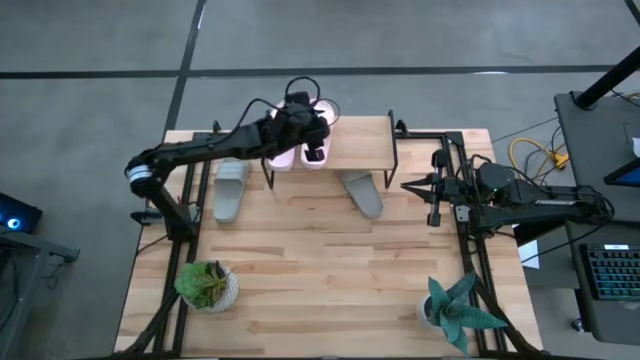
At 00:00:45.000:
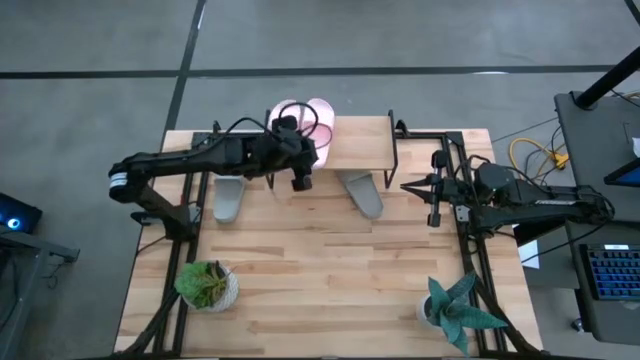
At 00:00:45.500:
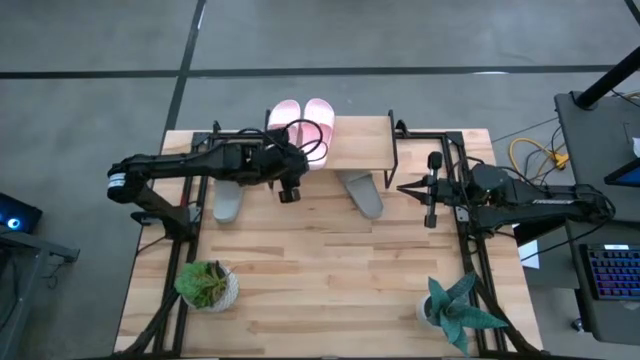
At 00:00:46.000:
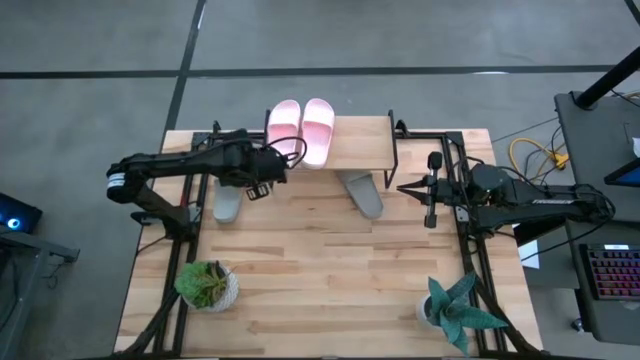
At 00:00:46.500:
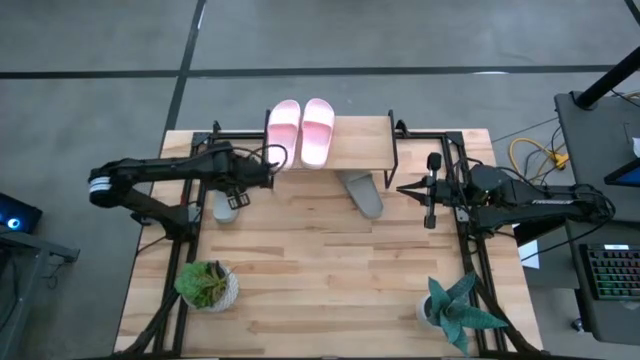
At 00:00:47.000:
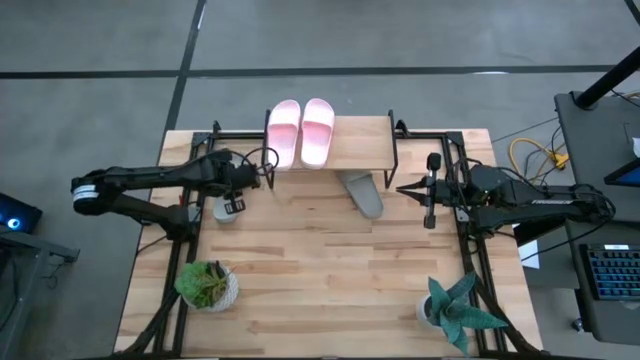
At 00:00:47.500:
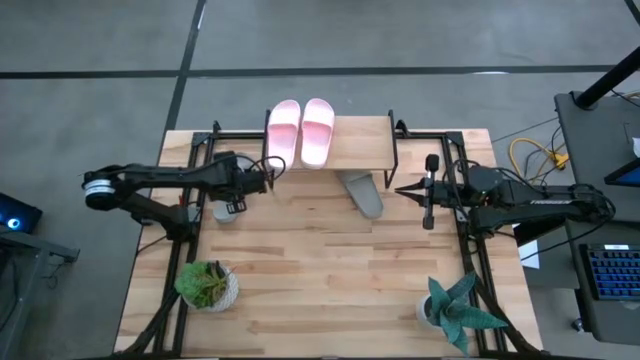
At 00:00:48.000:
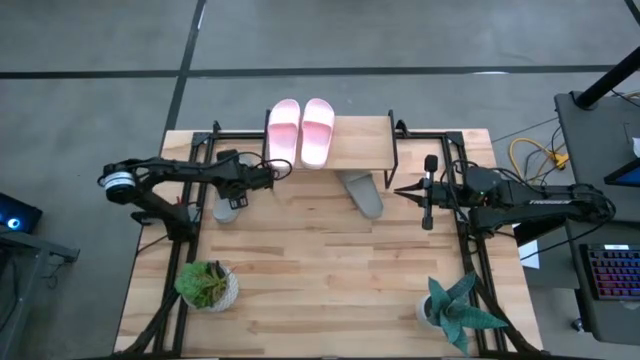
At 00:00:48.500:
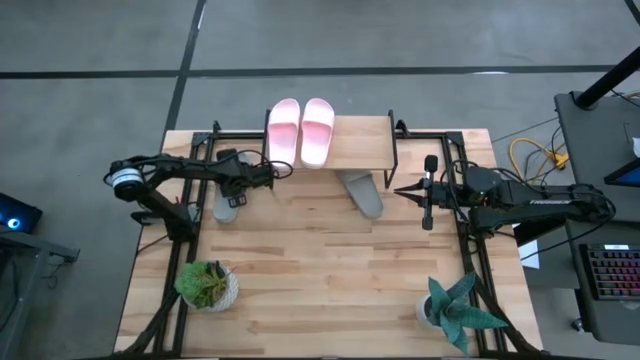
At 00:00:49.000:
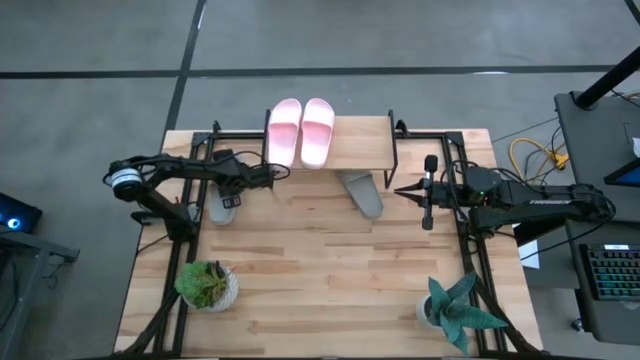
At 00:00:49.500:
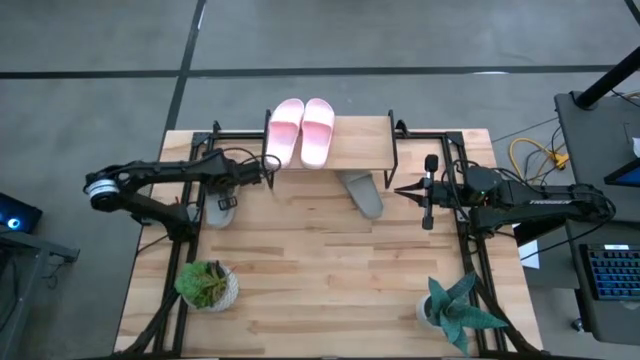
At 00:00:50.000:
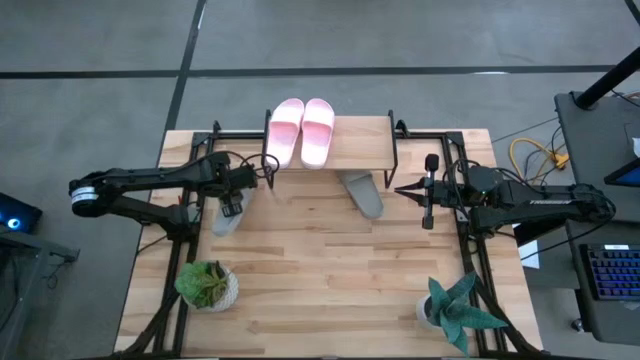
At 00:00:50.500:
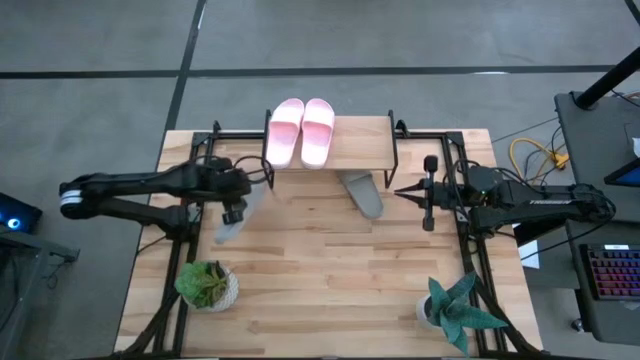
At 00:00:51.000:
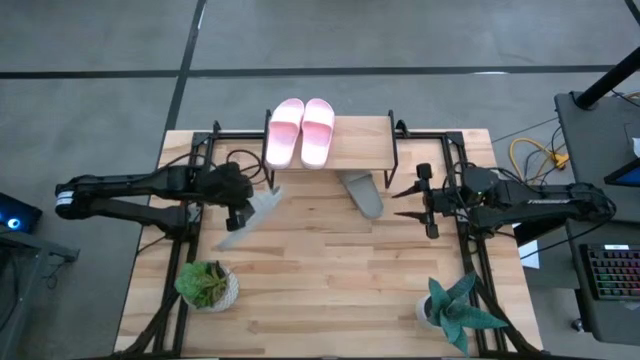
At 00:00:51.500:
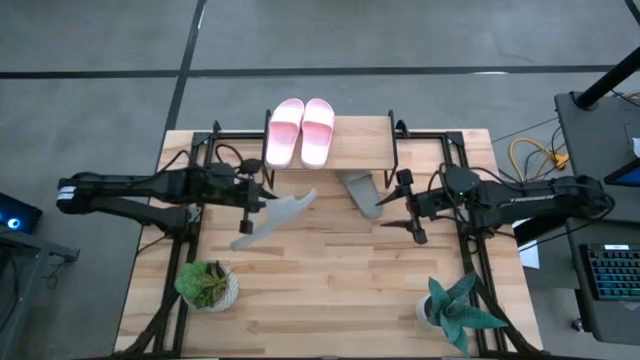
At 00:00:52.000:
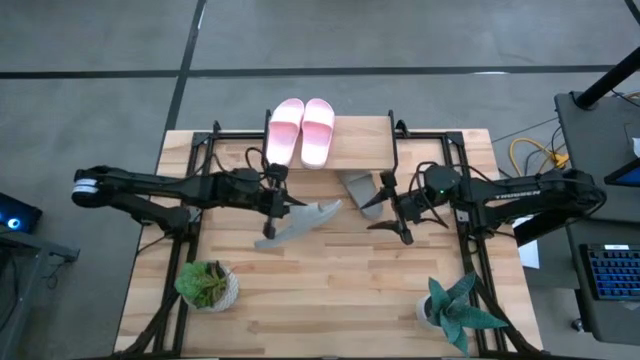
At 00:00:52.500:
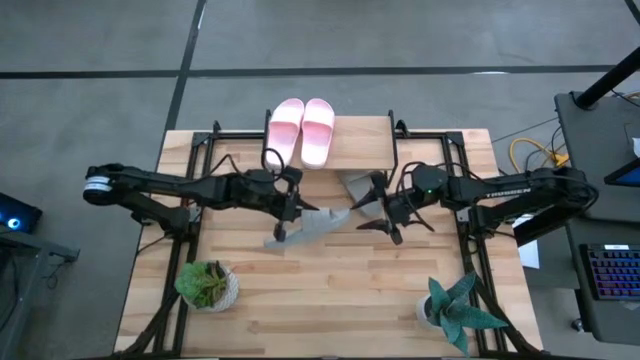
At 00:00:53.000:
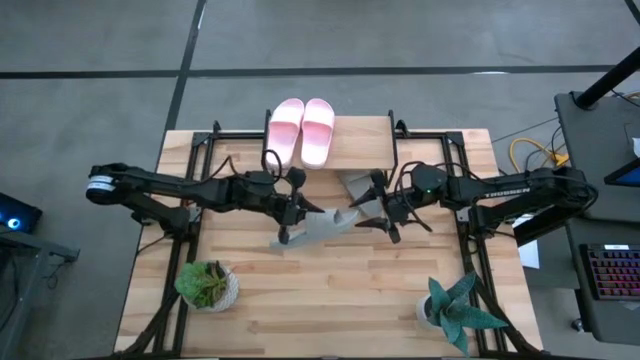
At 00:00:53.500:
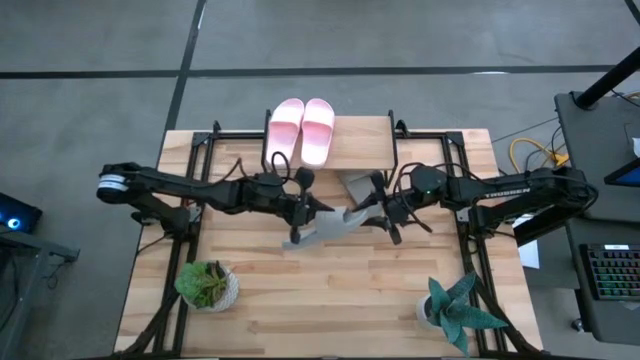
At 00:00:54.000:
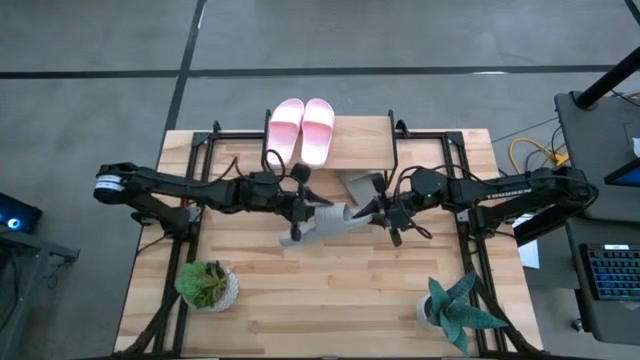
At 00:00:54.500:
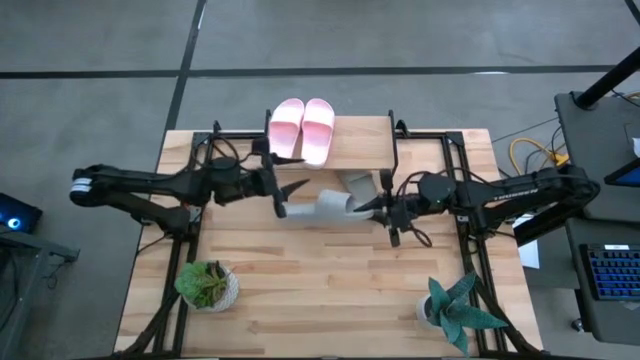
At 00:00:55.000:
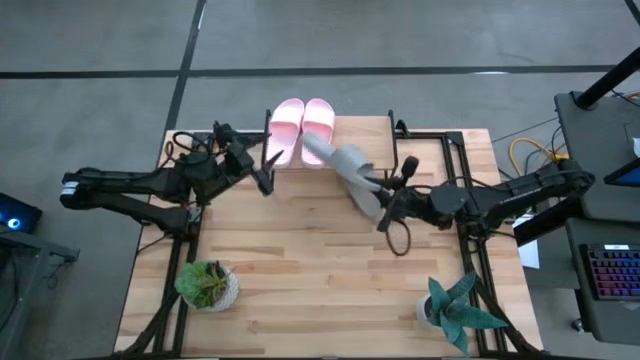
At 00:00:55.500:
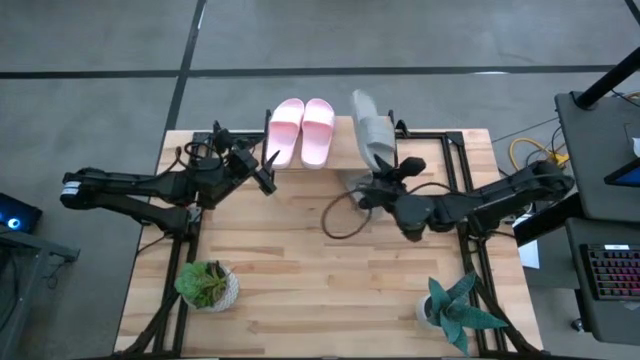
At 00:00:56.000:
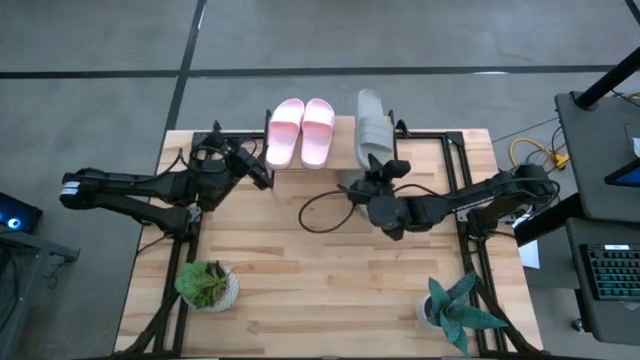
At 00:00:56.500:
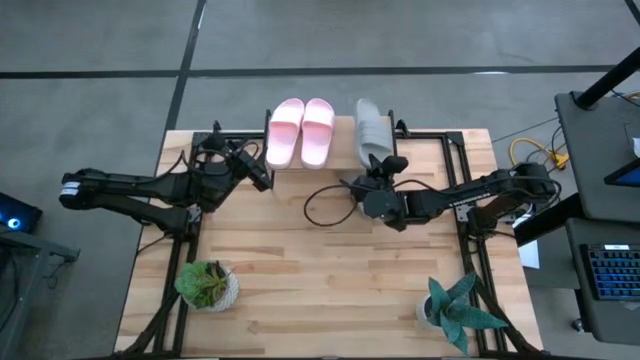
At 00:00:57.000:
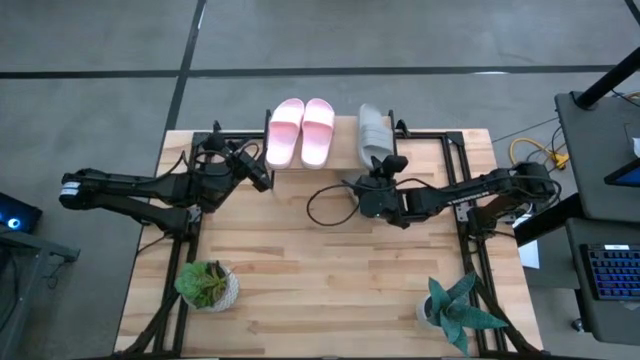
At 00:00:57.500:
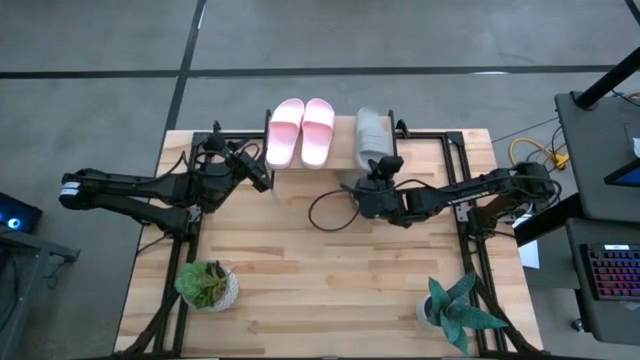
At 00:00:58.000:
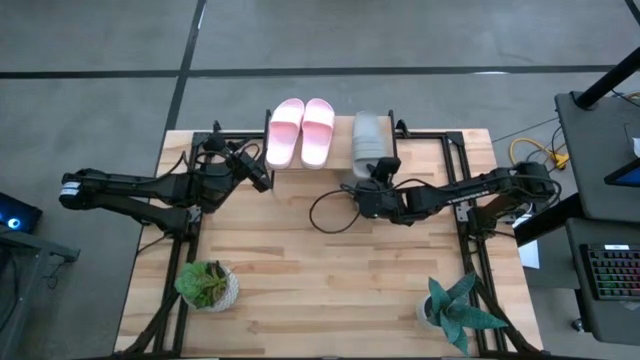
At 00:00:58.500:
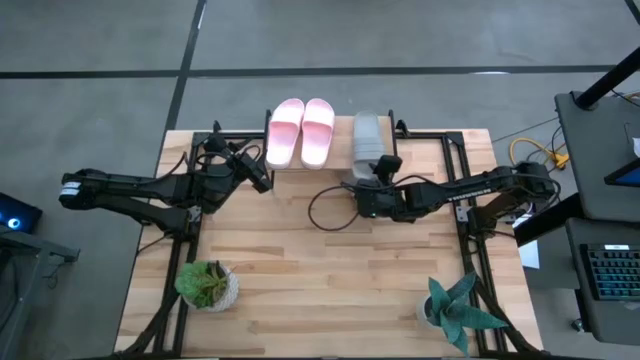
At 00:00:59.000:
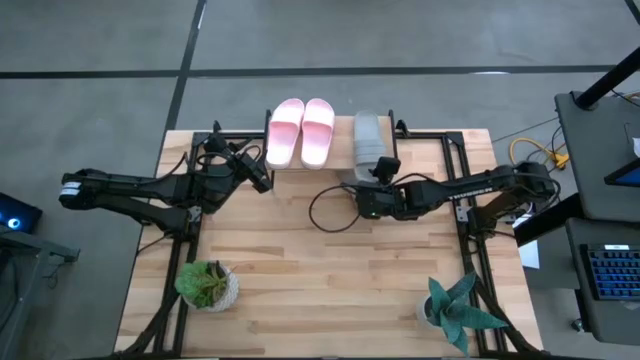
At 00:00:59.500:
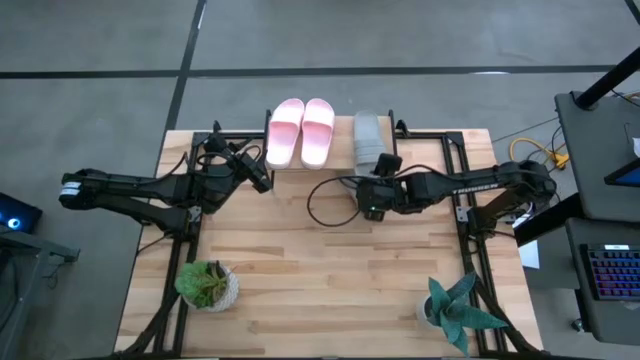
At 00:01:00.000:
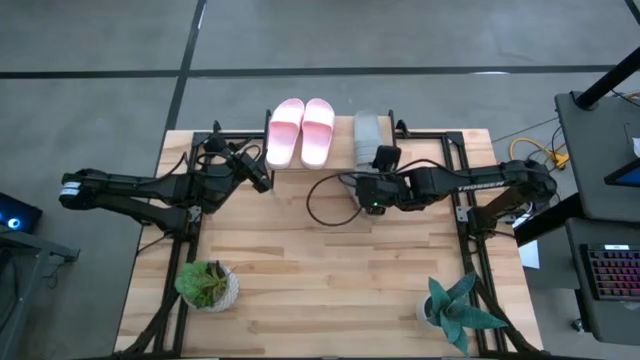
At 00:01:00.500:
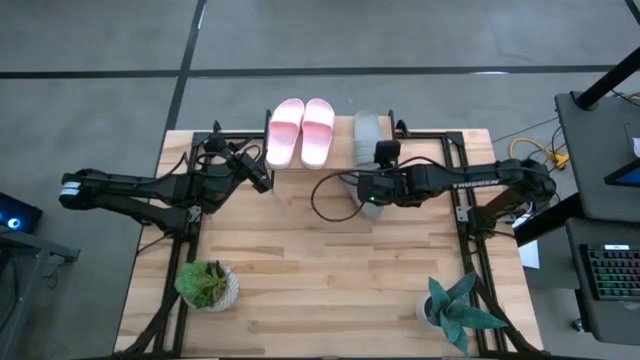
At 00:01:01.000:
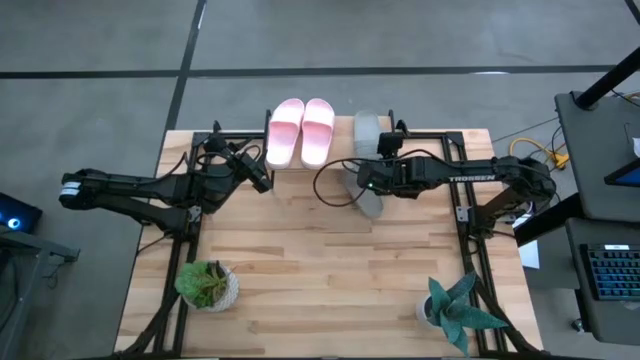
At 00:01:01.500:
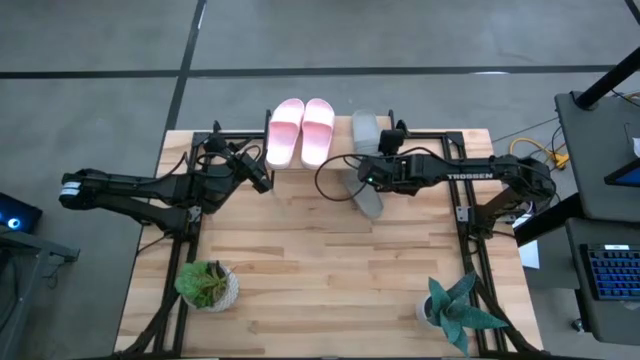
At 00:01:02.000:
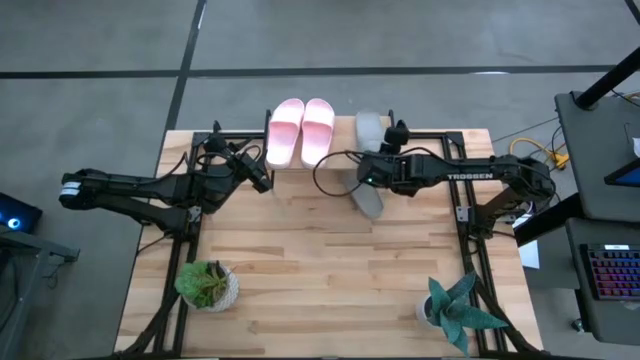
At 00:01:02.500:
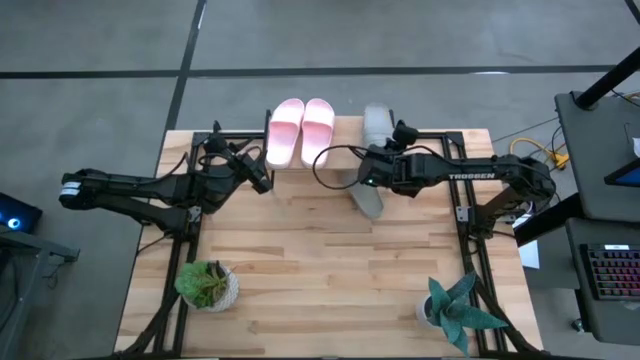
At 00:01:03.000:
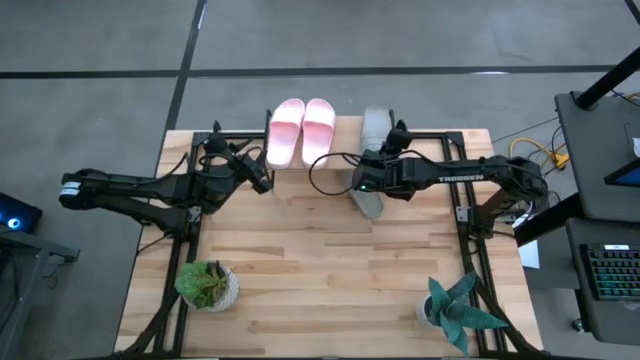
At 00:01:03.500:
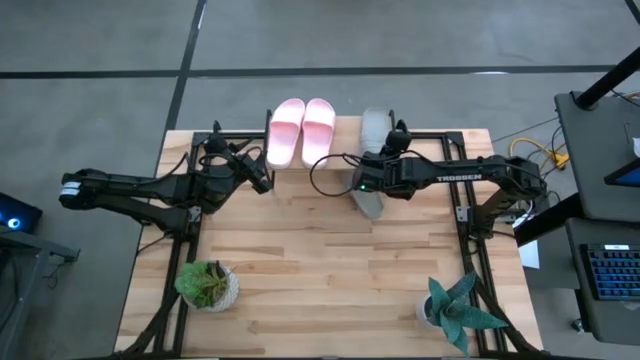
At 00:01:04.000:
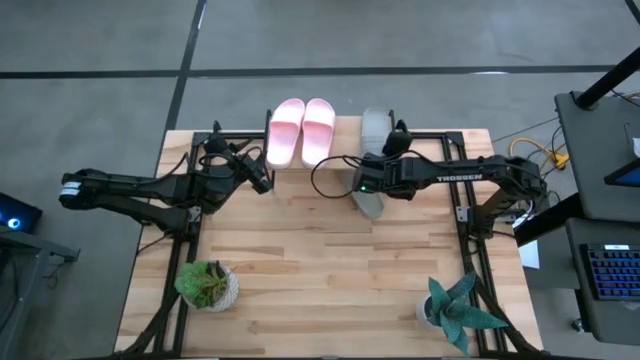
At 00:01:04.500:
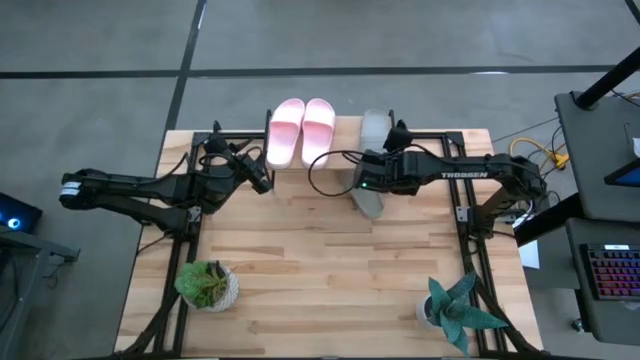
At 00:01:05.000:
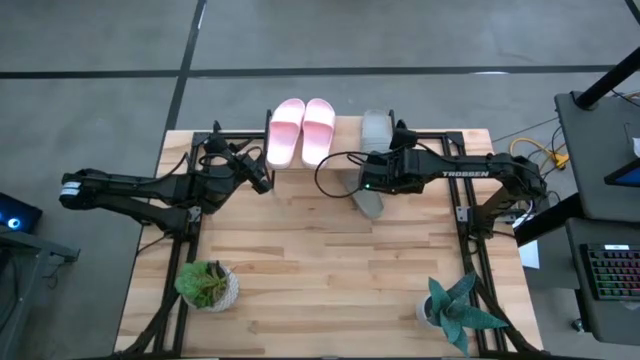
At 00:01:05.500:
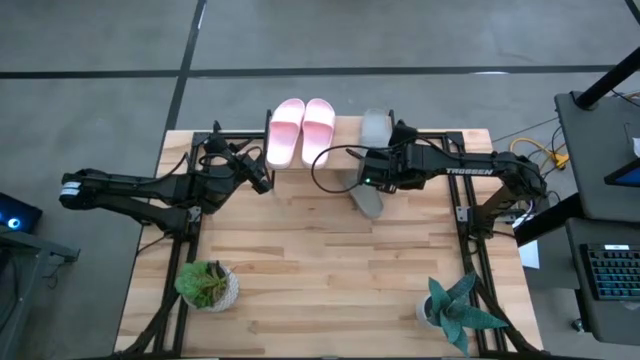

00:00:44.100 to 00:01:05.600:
Task: Pick and place slides into the shelf
Put the left gray slides on the shelf
